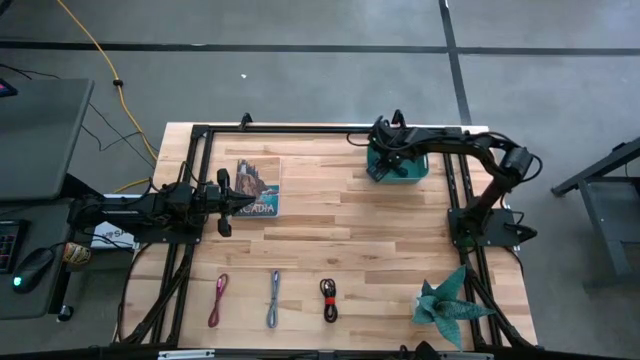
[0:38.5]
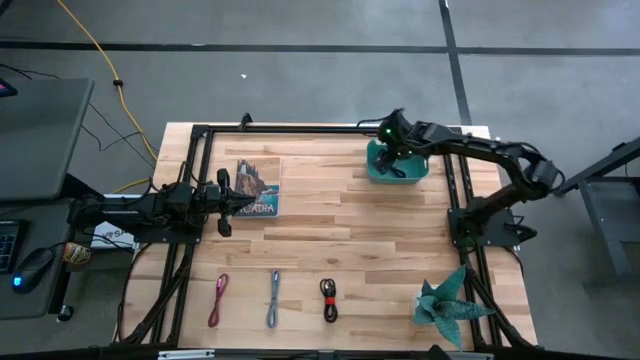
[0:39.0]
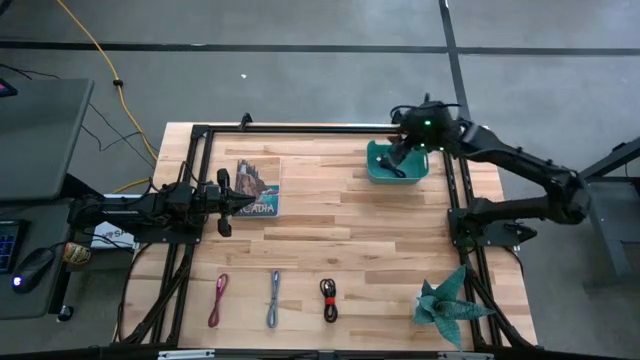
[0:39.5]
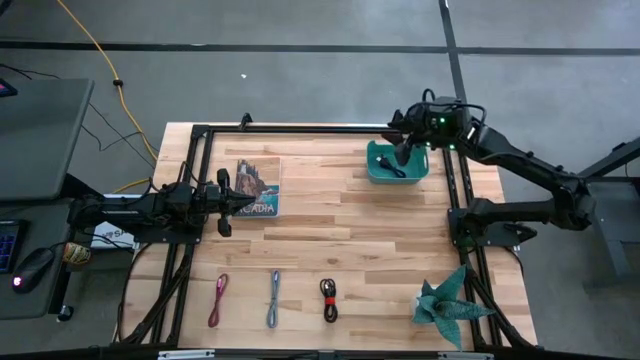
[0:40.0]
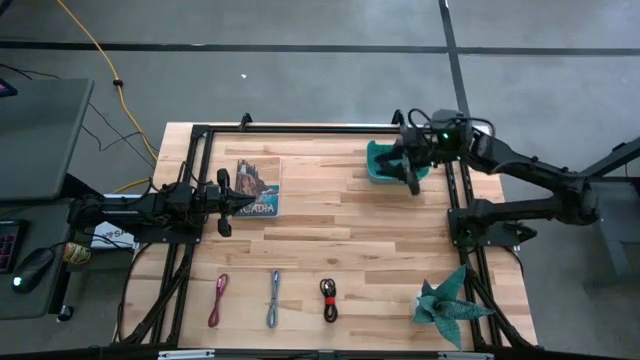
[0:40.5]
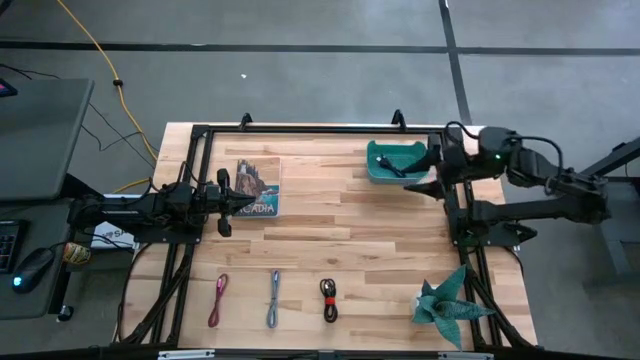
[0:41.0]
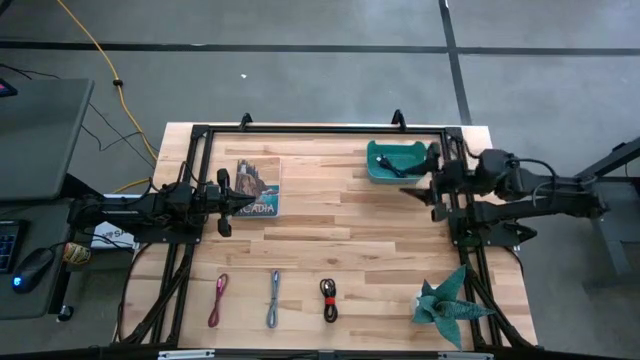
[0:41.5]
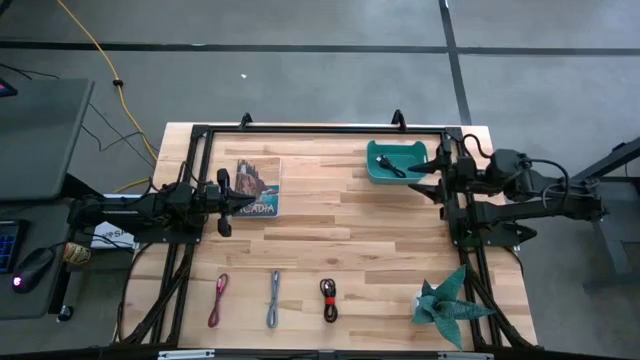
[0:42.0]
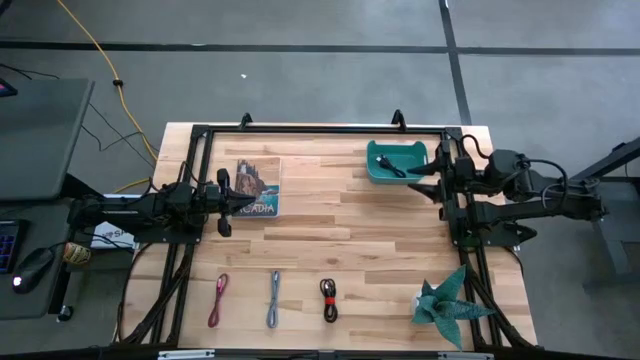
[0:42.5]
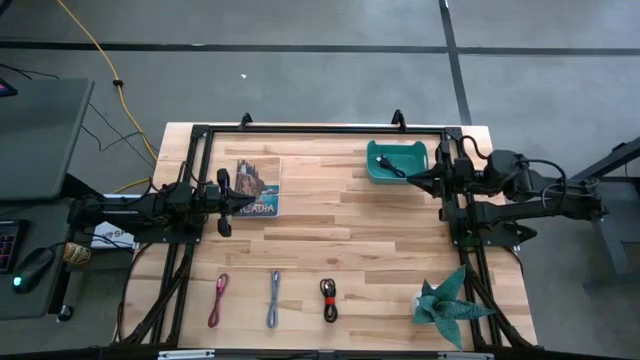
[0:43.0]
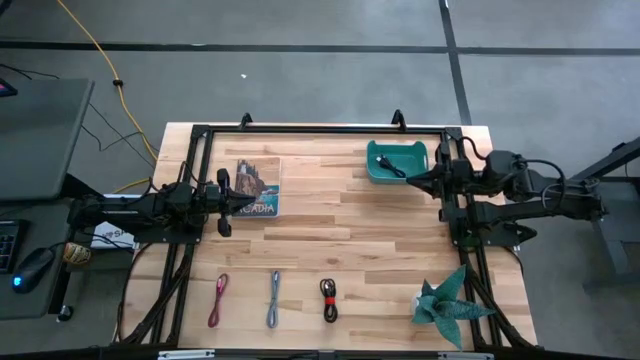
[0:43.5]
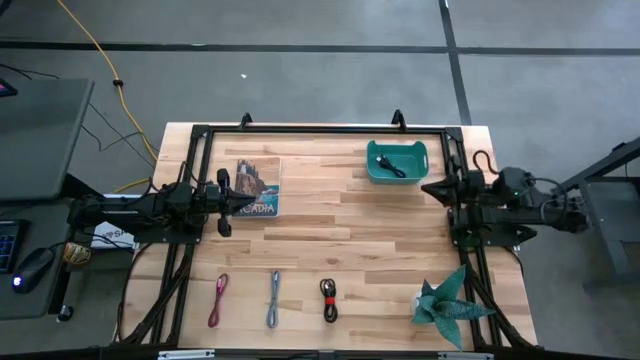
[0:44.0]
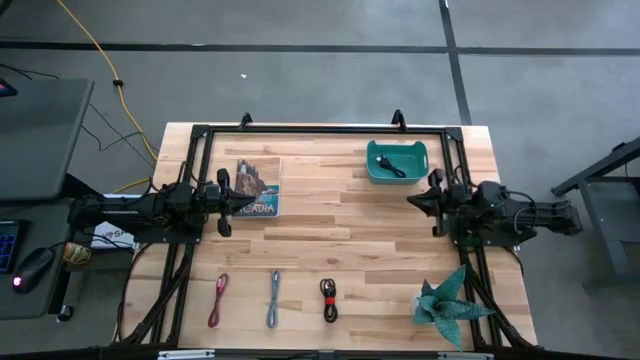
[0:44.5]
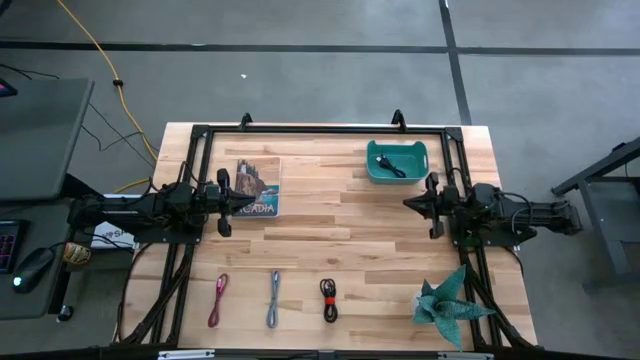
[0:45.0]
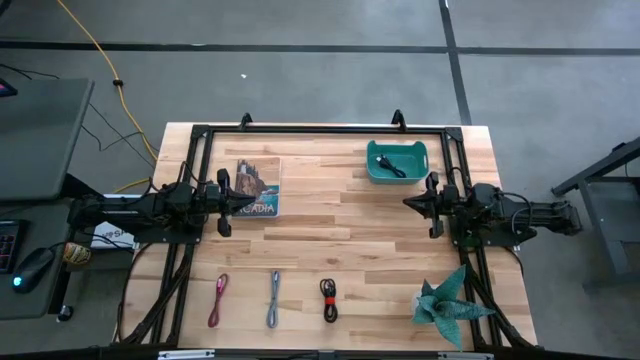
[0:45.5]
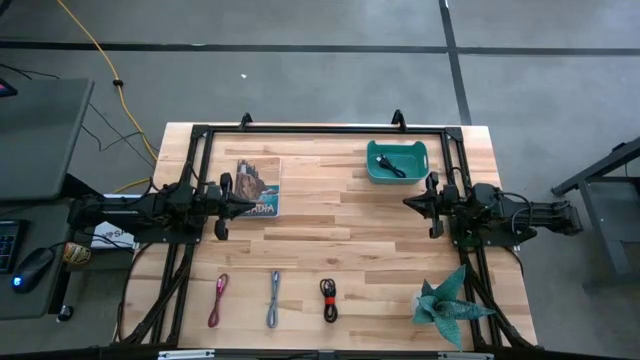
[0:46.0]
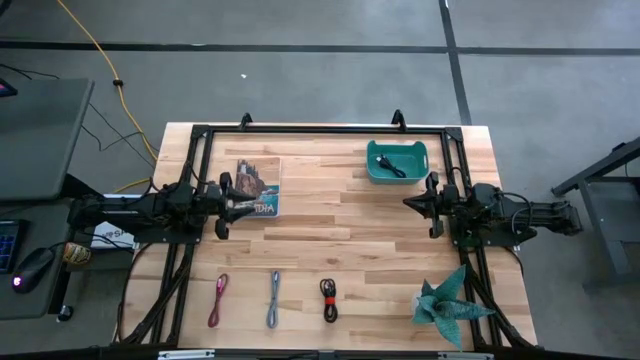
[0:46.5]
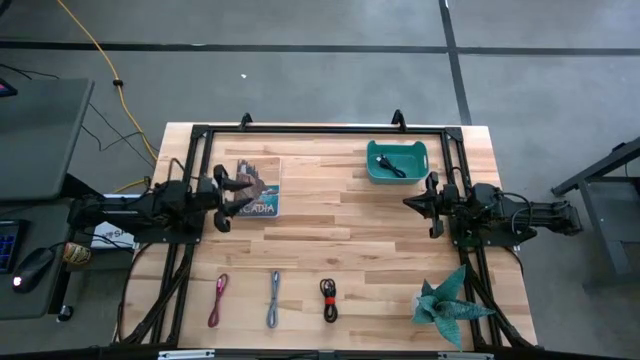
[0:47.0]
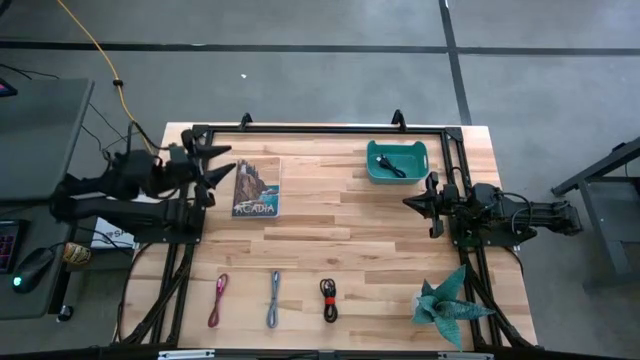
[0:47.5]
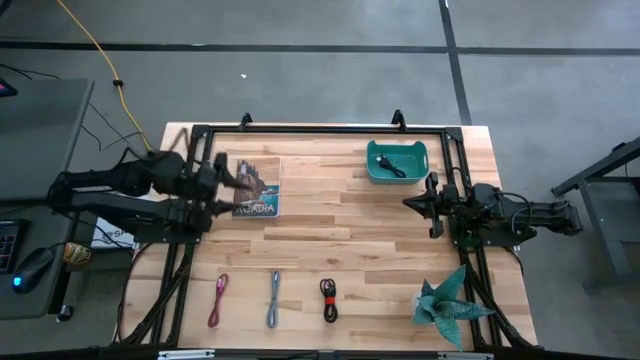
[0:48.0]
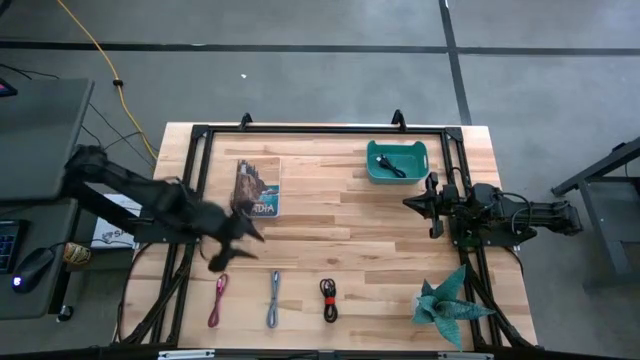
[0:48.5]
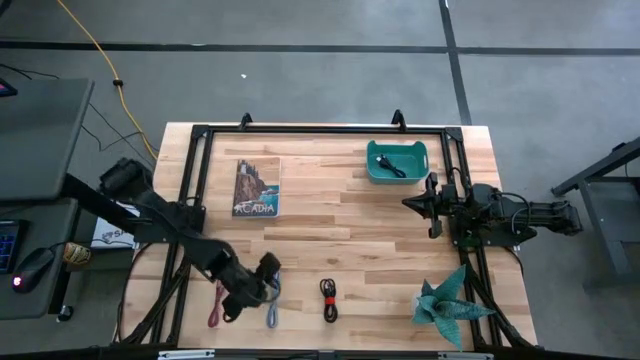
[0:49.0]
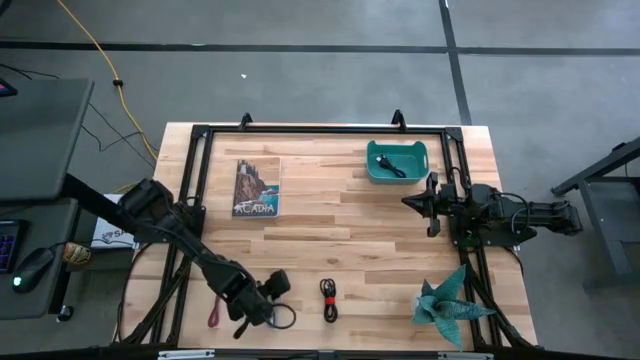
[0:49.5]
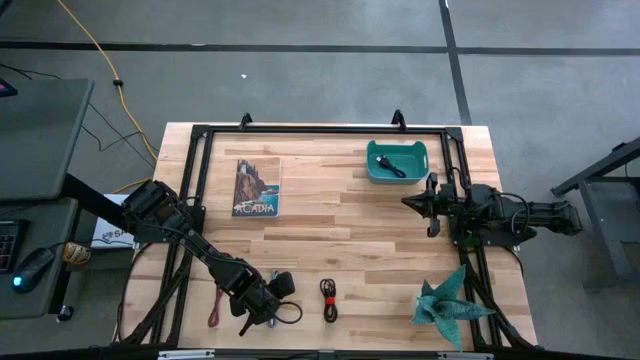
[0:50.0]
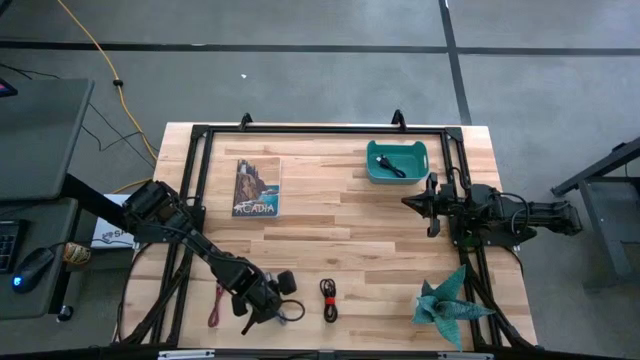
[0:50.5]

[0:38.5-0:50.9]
Task: Pick and place USB-C Cables
Put the white charger cable into the green bin

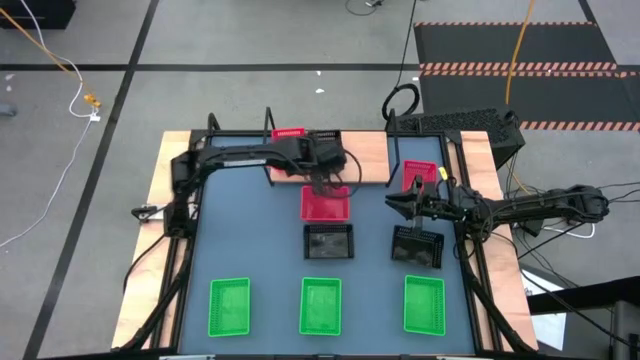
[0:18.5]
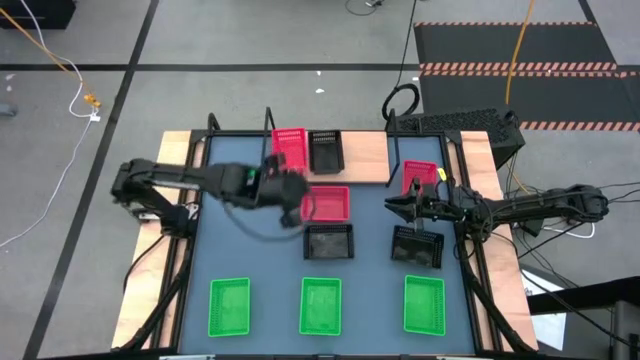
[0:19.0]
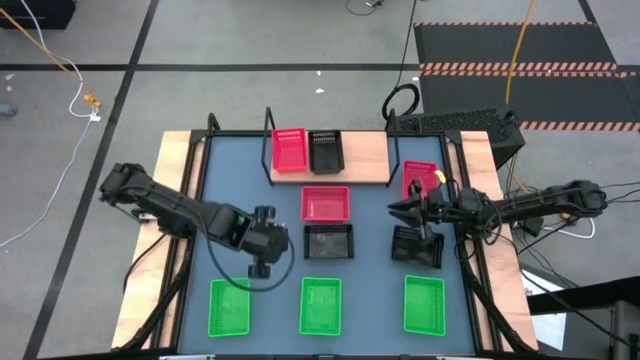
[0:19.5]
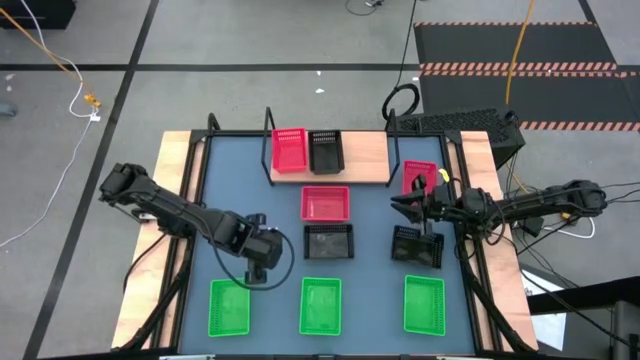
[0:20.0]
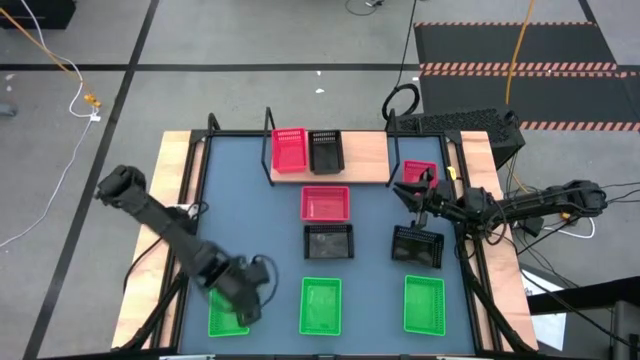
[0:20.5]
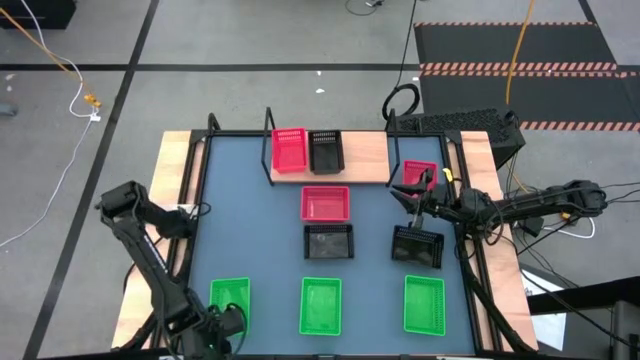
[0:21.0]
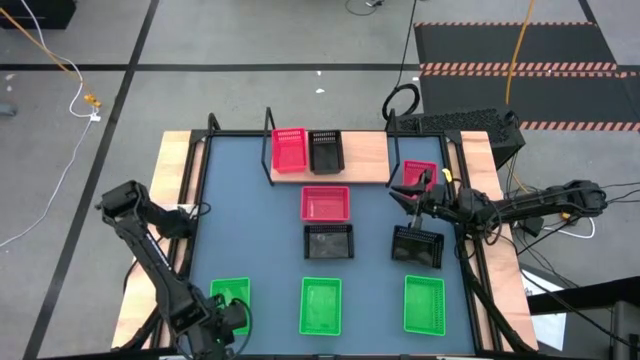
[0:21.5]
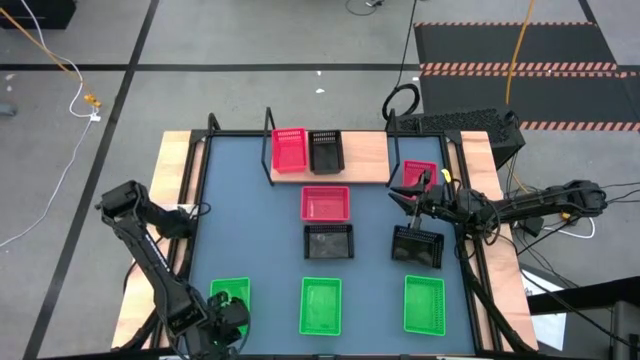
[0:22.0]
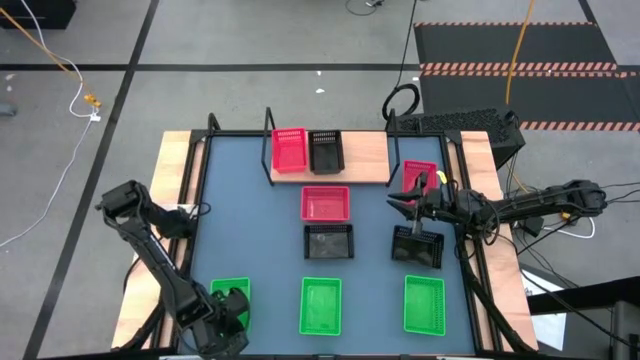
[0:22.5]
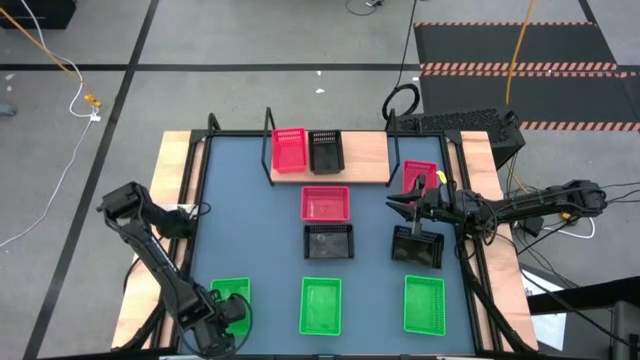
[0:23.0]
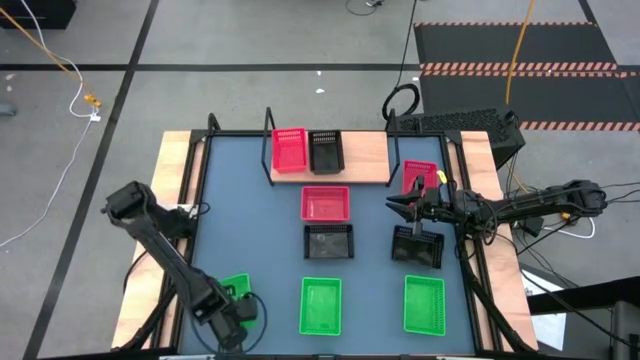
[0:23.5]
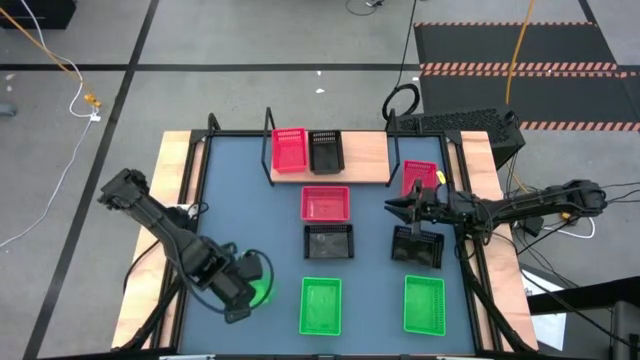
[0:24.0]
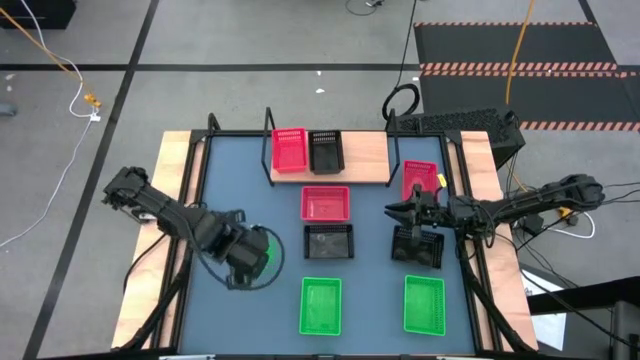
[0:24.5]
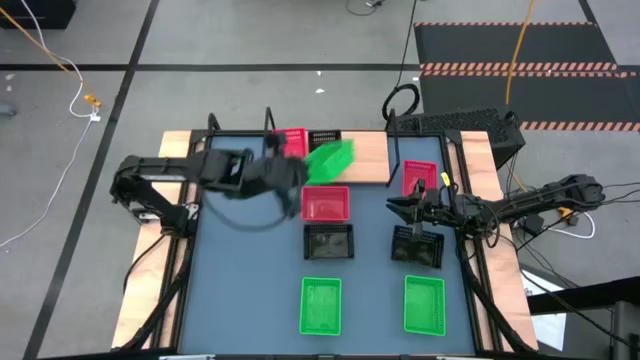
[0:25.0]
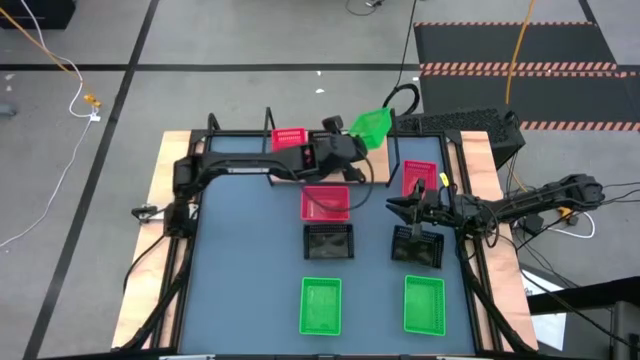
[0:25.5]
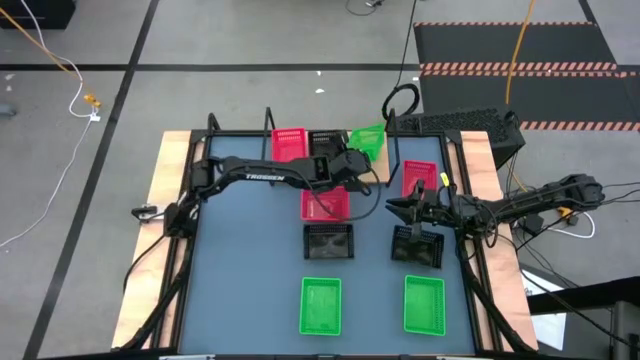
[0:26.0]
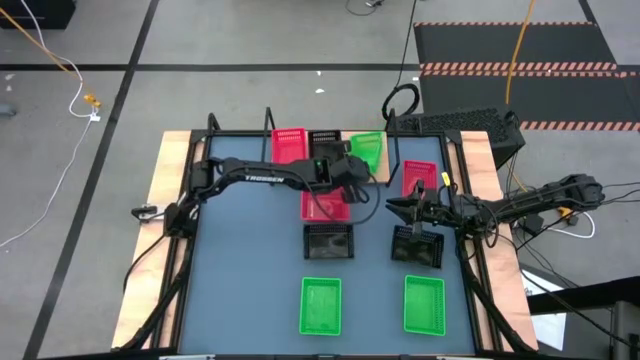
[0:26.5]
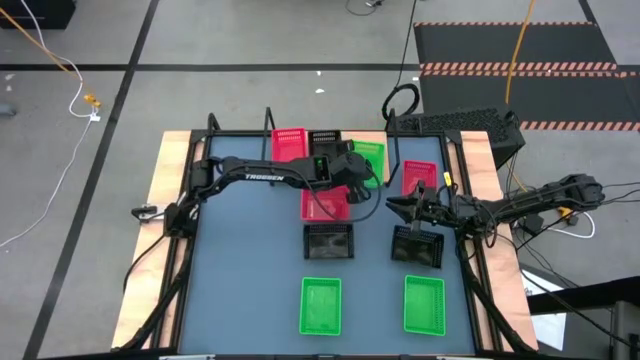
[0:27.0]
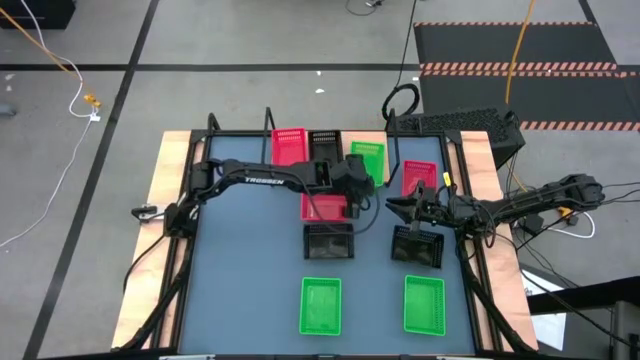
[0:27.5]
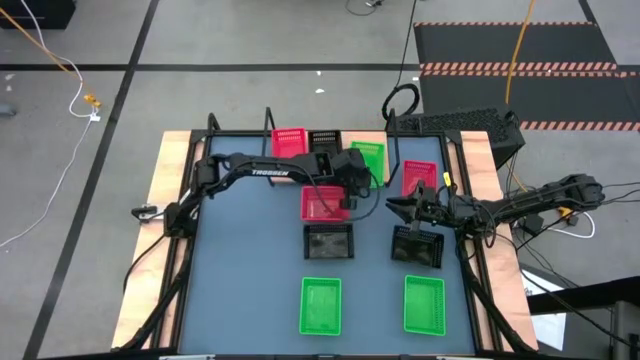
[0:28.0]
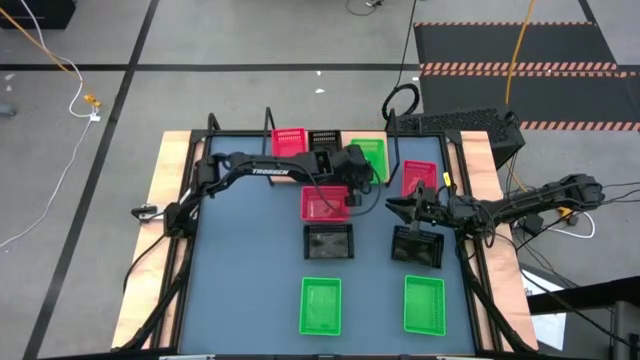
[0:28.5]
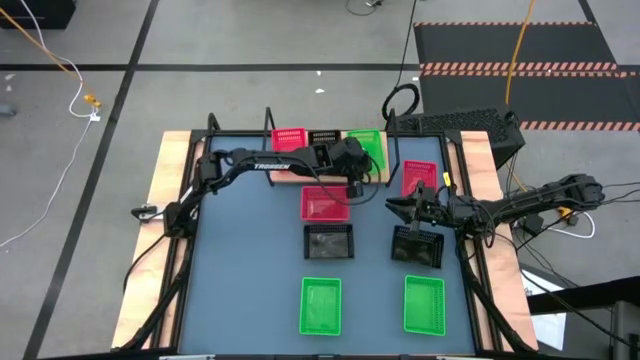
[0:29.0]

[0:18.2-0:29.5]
Task: Stack baskets on shelf by color
Put the left green basket on the shelf
